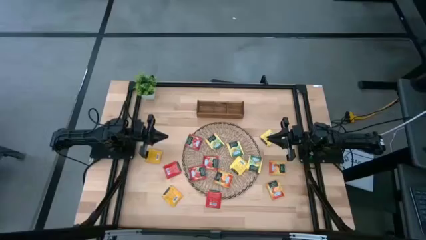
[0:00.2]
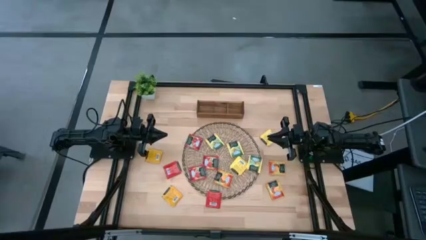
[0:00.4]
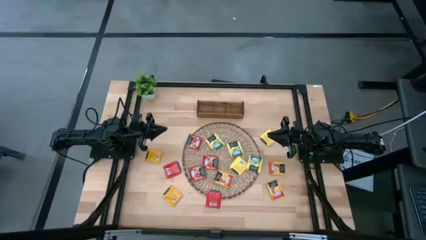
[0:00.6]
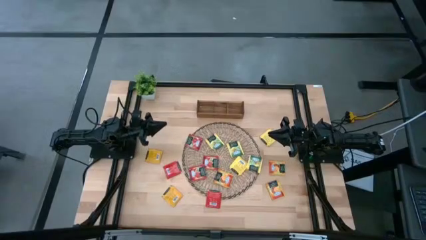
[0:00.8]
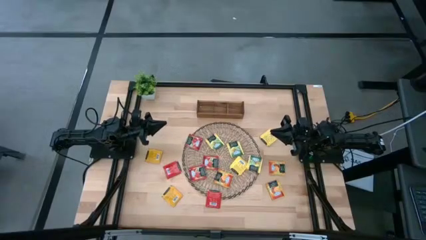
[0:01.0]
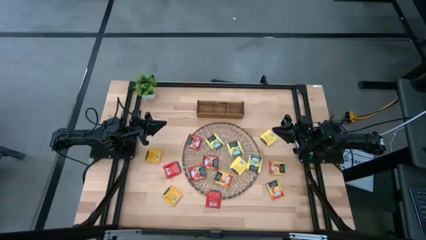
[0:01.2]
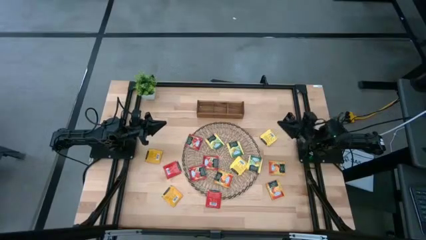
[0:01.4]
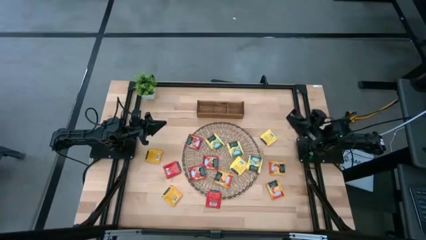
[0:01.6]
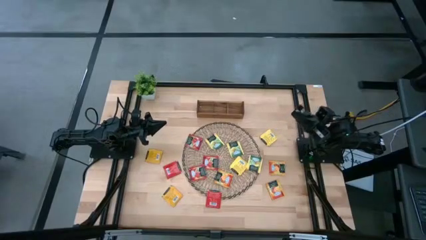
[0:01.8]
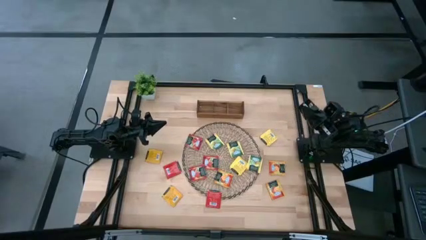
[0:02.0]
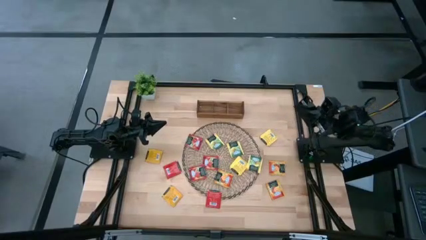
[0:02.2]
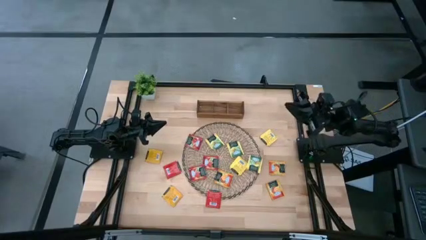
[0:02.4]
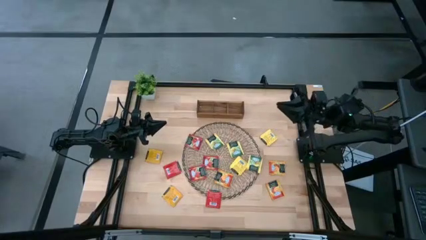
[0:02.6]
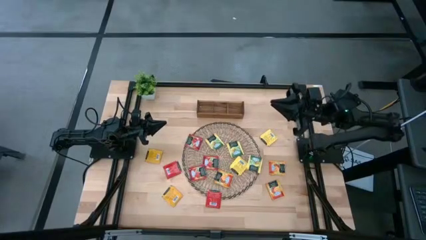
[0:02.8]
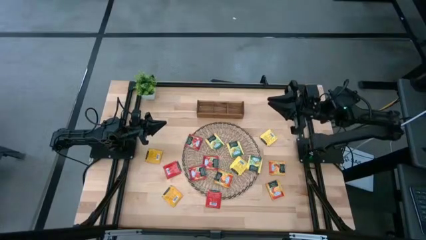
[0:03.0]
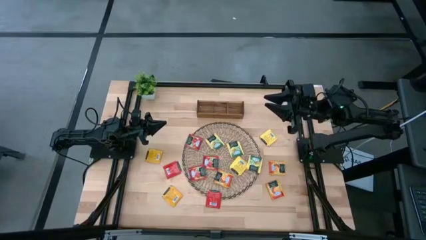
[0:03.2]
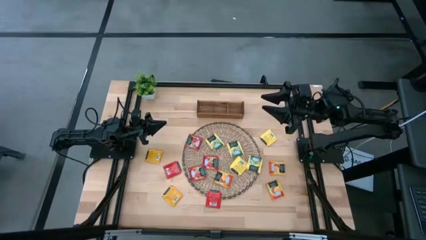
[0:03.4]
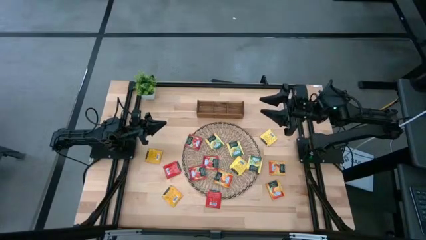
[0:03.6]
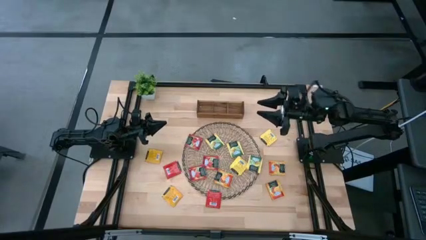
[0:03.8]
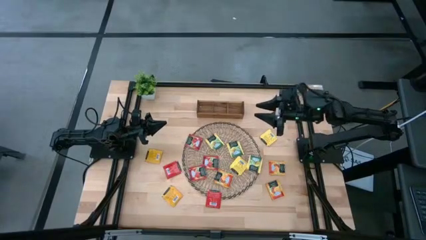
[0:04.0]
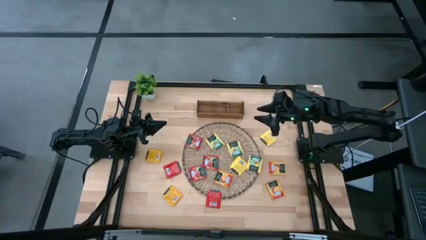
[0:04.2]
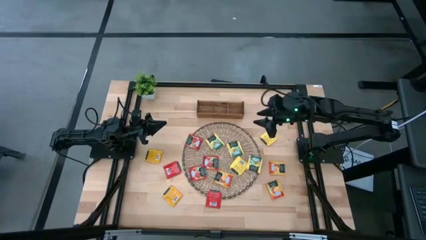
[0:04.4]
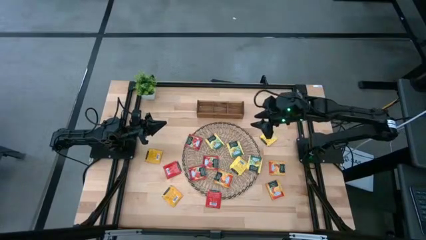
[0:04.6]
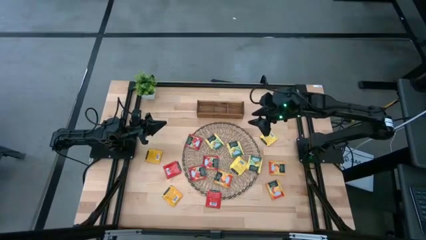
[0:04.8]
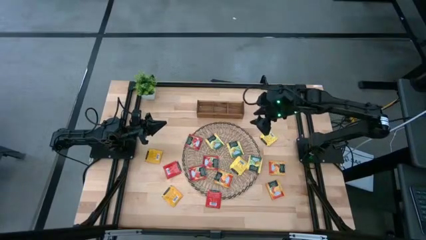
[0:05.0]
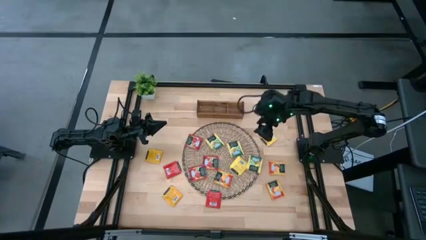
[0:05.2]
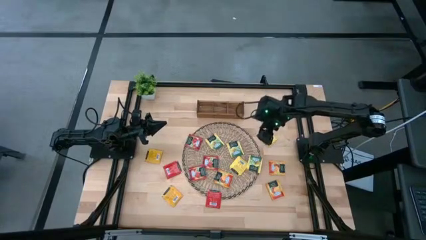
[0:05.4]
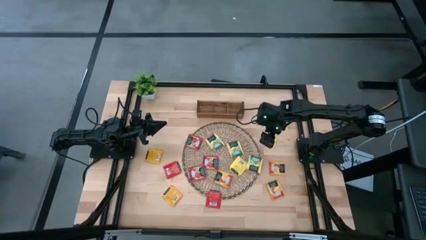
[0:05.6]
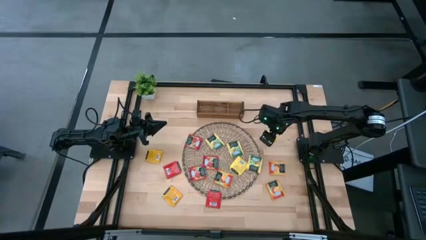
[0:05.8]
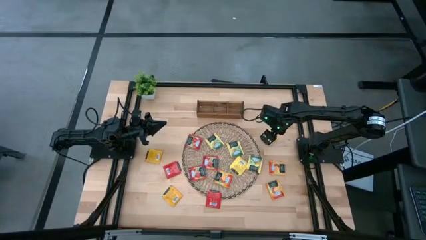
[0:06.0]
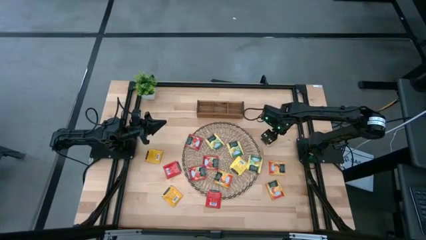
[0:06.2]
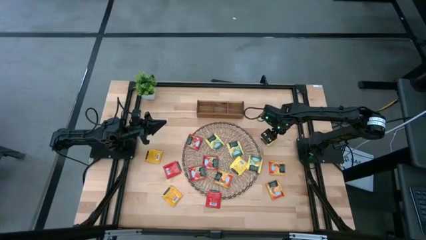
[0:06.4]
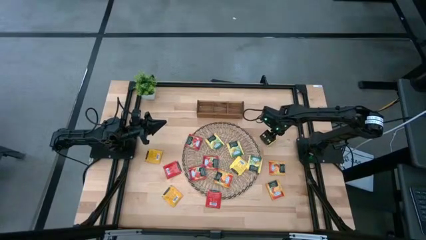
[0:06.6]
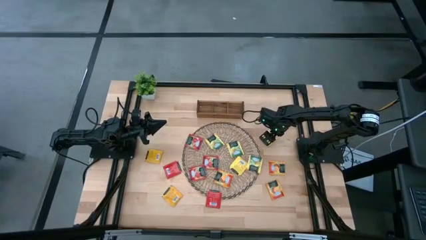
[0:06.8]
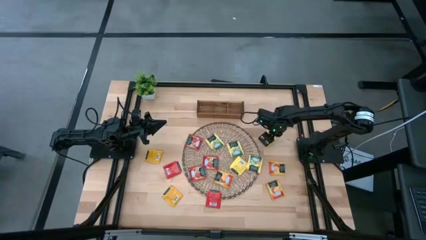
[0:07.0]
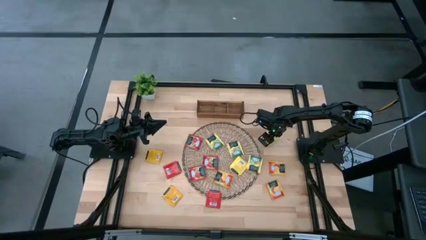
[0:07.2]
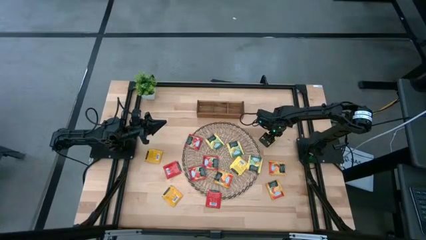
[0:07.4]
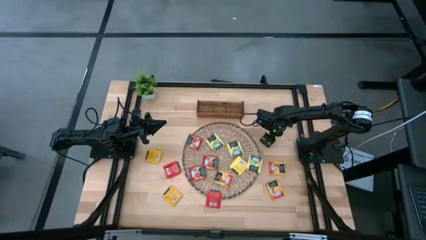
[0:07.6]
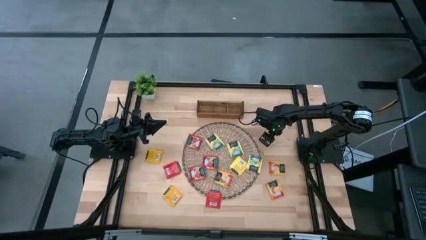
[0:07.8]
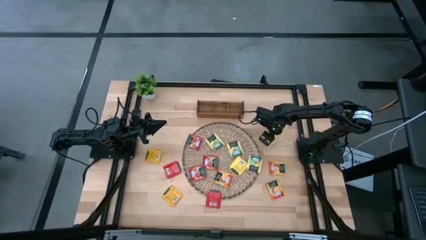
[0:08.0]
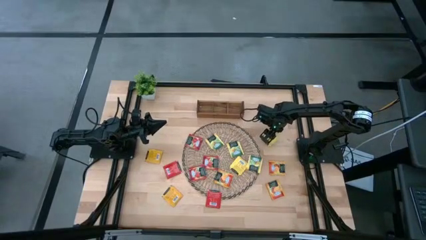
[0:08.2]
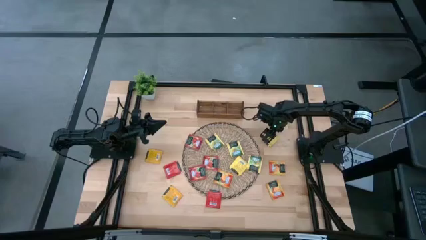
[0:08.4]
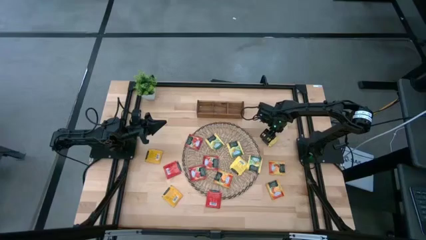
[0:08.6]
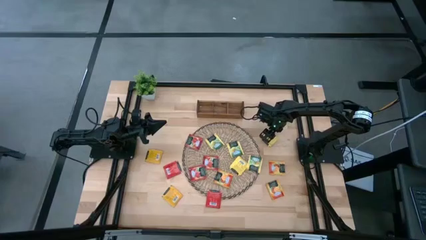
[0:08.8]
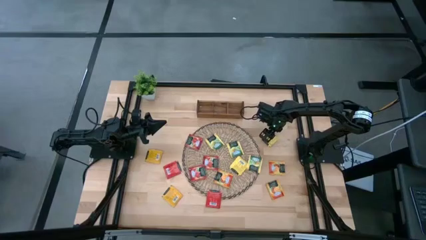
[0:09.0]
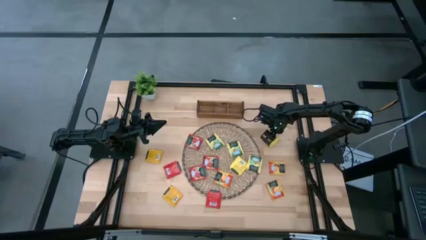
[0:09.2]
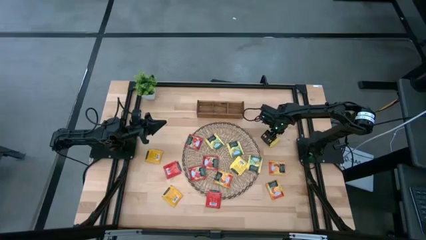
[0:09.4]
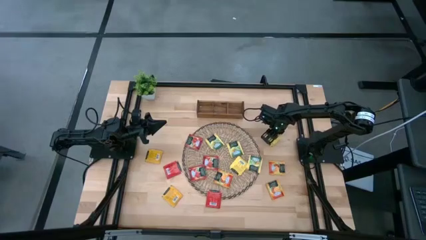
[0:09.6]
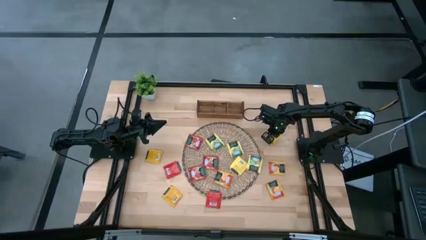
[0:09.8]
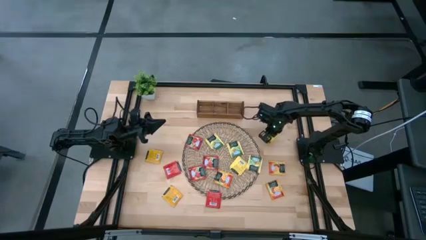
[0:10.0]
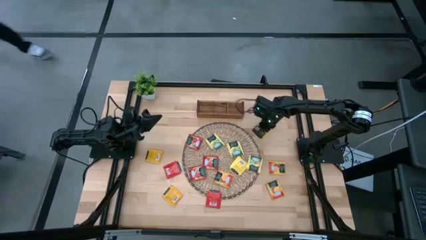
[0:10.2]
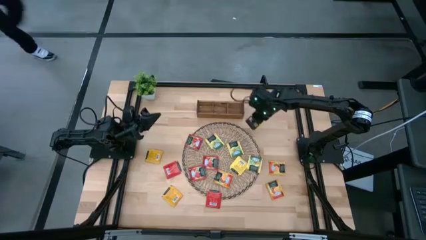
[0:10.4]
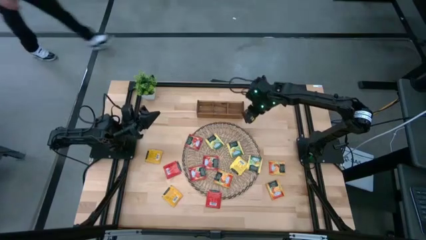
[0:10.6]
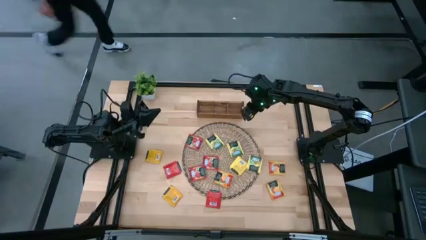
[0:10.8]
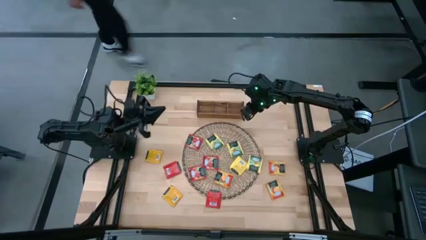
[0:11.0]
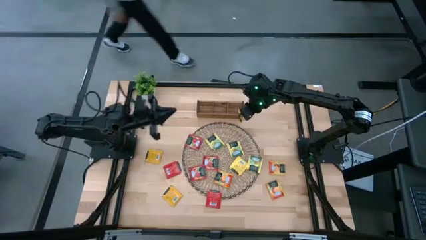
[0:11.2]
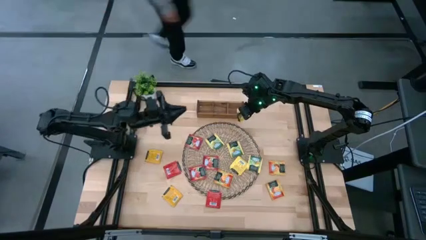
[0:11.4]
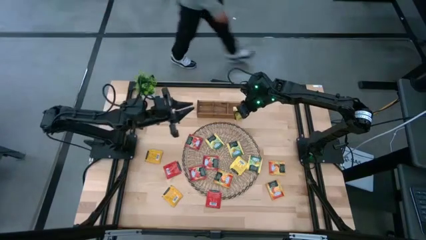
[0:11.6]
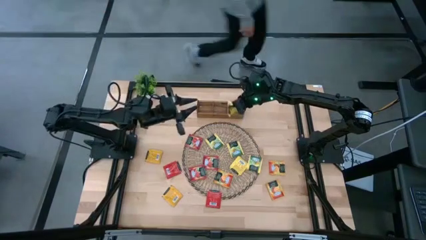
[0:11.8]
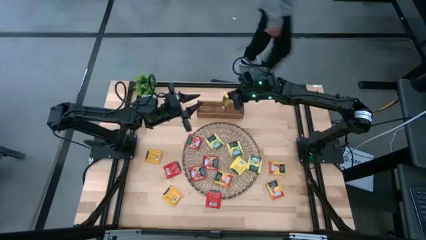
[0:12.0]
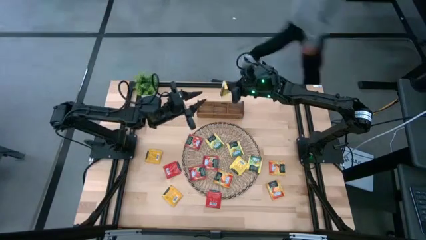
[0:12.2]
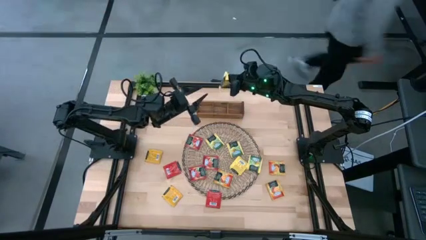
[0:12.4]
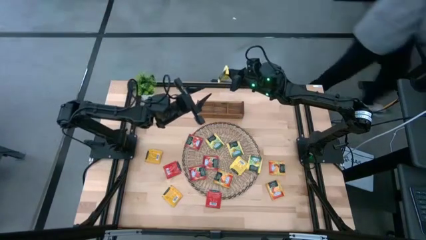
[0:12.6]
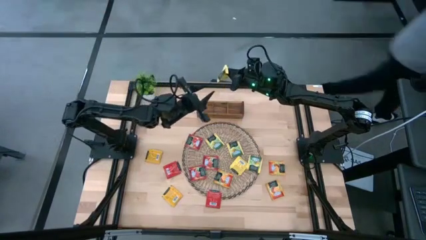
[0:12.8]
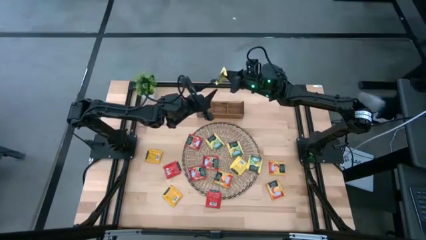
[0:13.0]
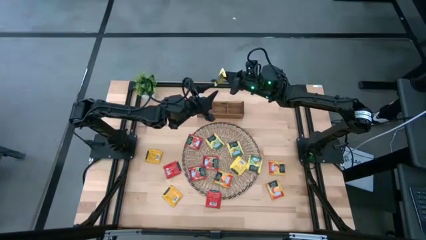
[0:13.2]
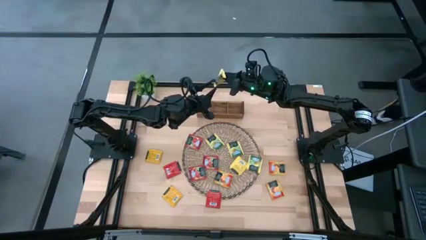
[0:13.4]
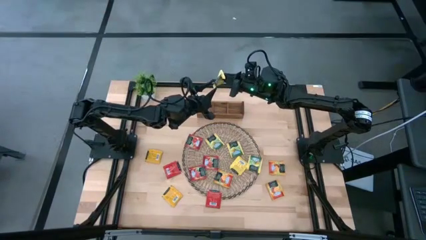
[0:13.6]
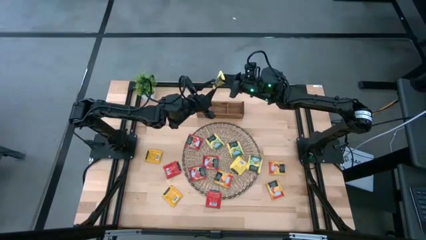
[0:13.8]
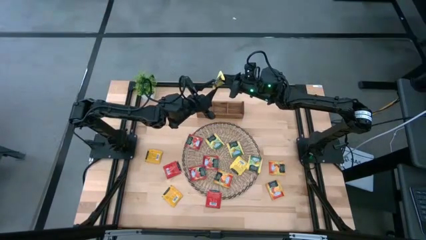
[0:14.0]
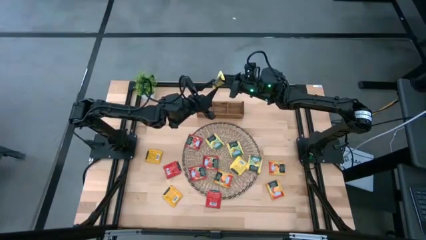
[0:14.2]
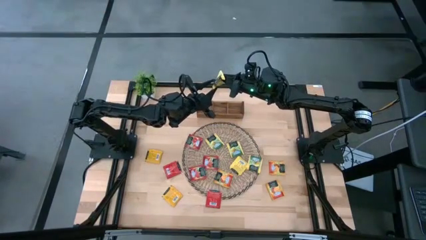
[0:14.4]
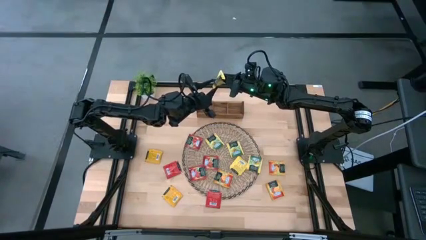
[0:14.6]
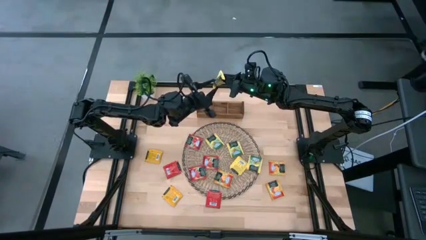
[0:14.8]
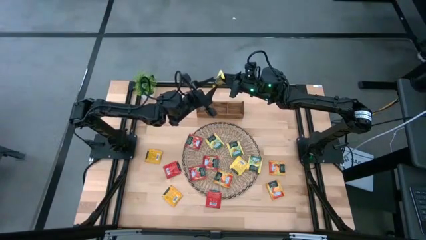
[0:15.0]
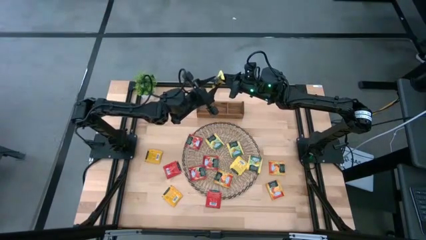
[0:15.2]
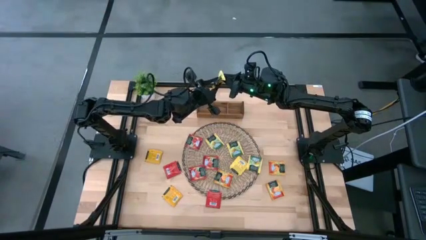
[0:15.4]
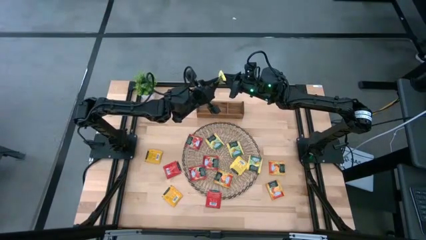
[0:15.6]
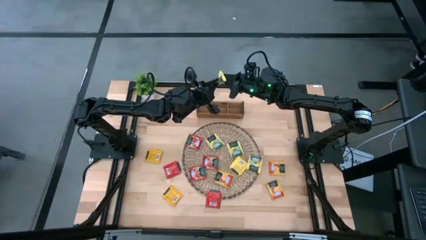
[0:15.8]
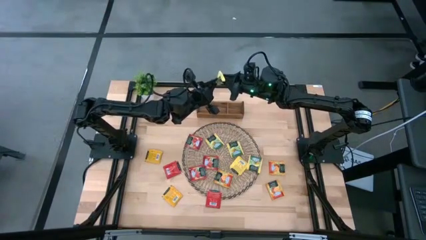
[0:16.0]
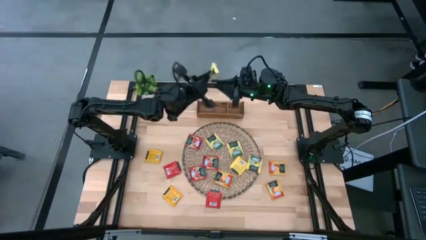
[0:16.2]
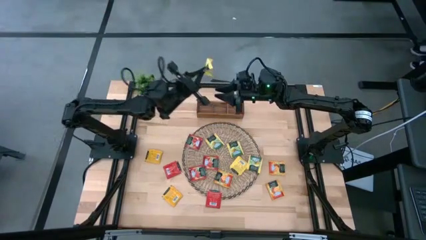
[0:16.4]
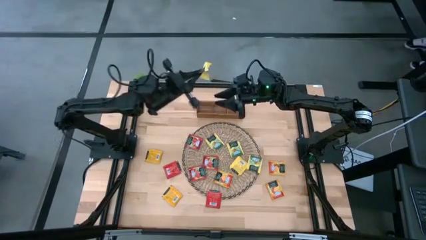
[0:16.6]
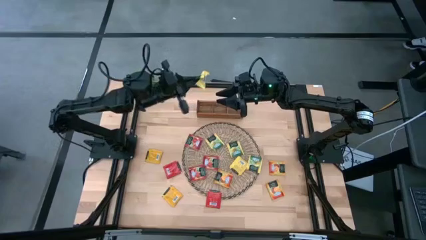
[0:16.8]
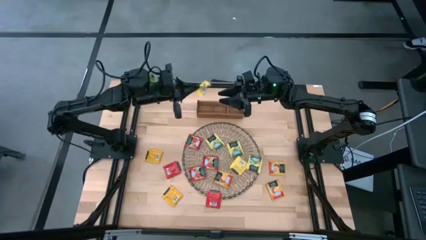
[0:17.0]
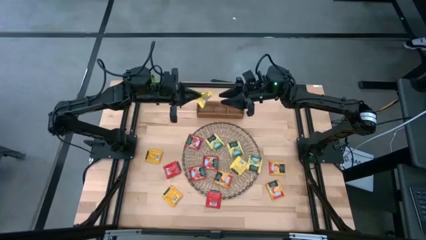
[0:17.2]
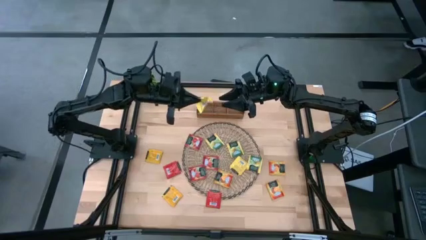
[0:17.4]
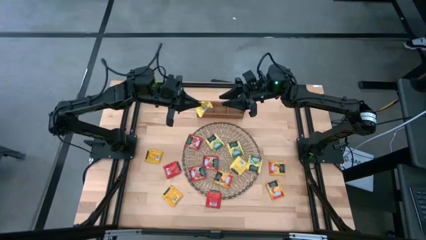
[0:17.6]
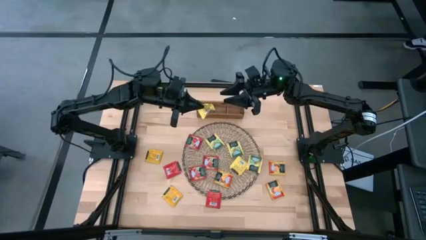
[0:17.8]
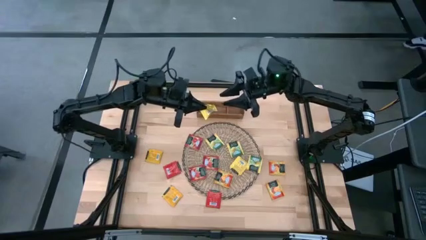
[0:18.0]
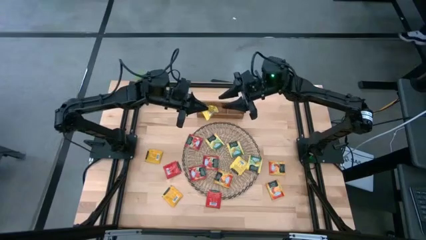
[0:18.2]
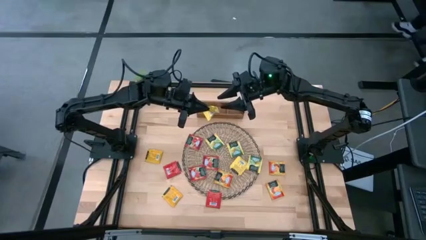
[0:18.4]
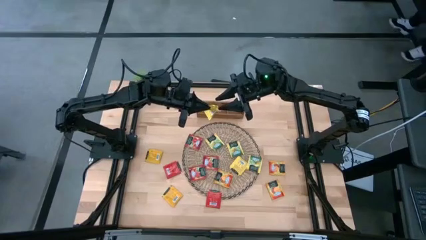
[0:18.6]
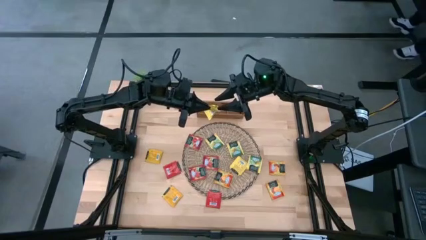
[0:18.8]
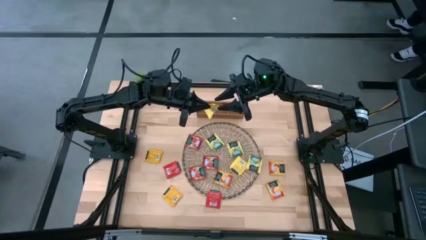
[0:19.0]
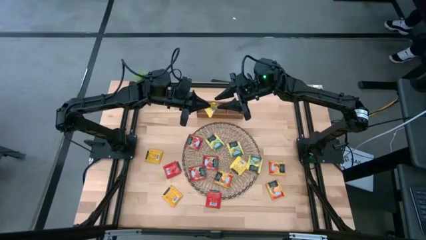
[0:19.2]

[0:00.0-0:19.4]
Task: Pick & Place Tea
Put the yellow tea bag into the left of the wooden organizer
